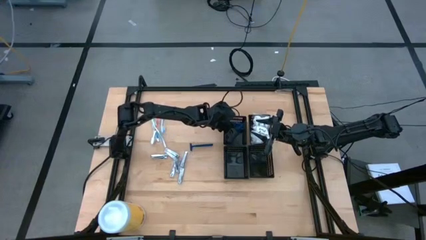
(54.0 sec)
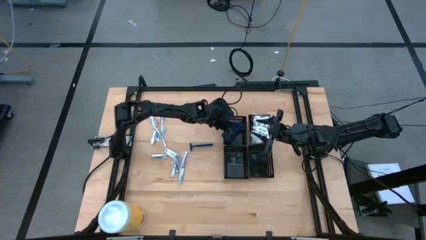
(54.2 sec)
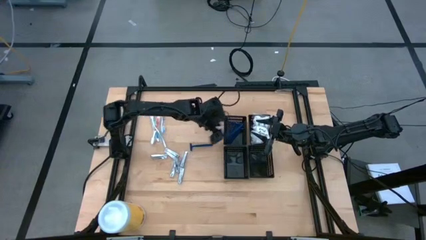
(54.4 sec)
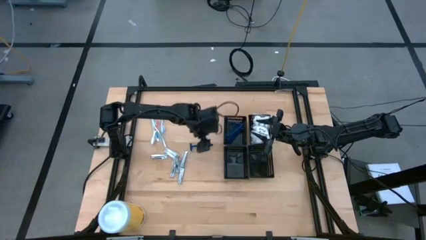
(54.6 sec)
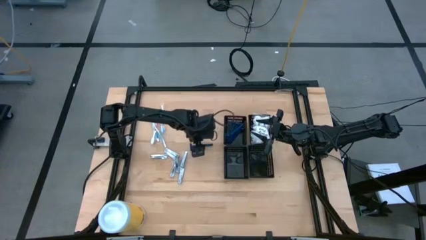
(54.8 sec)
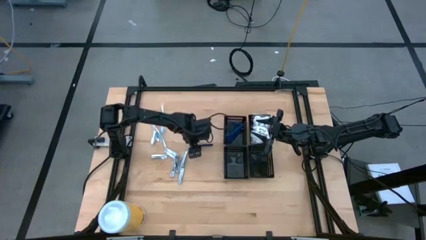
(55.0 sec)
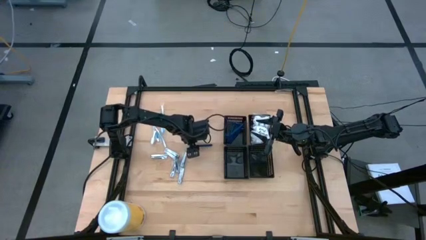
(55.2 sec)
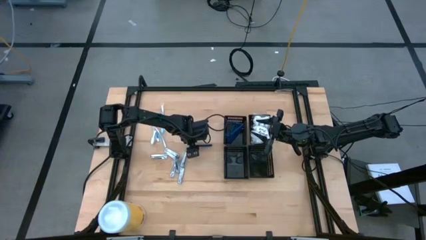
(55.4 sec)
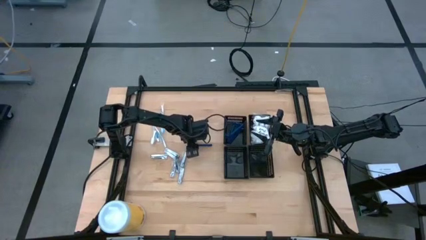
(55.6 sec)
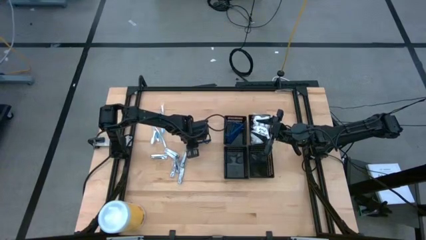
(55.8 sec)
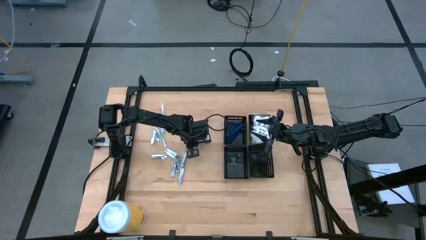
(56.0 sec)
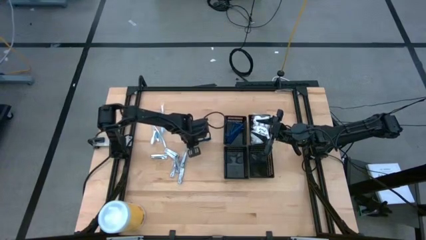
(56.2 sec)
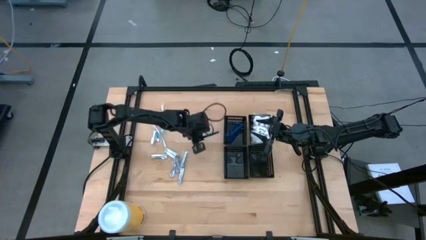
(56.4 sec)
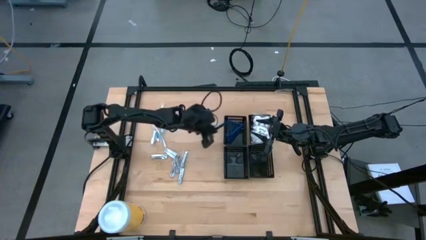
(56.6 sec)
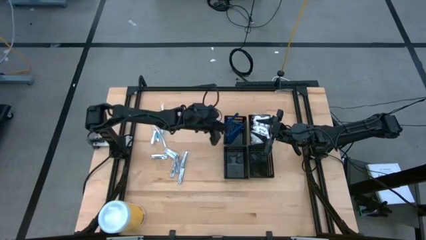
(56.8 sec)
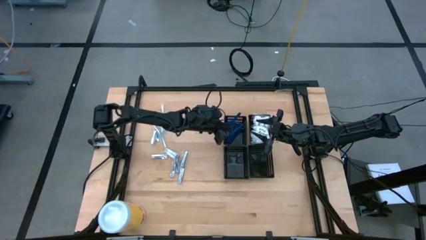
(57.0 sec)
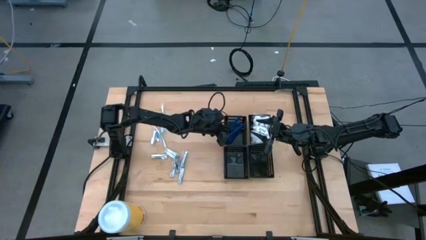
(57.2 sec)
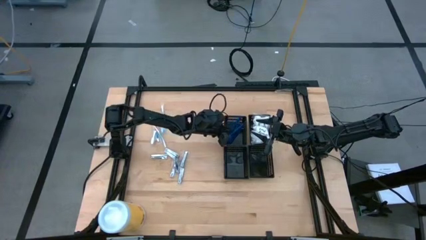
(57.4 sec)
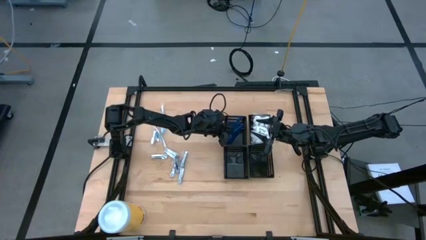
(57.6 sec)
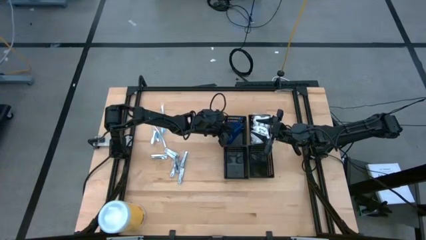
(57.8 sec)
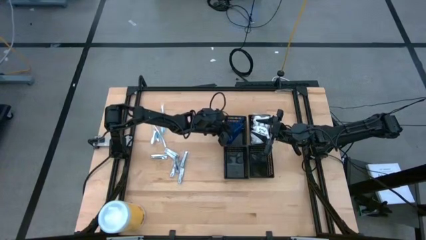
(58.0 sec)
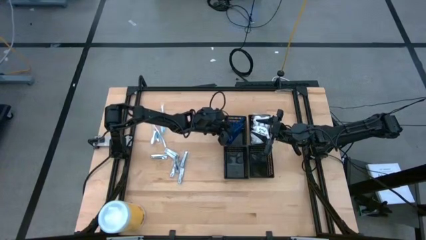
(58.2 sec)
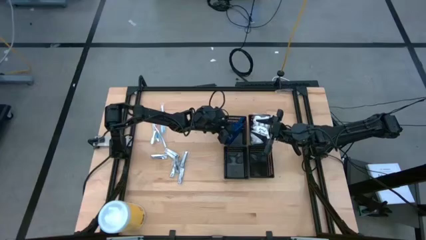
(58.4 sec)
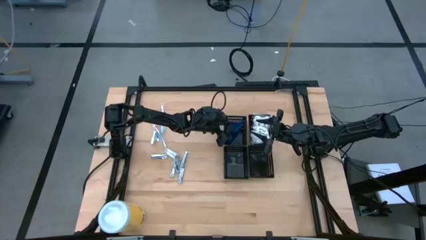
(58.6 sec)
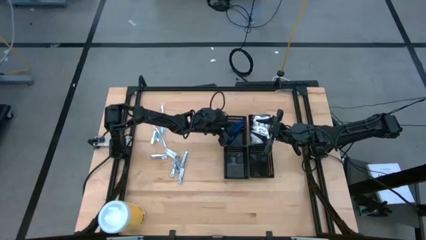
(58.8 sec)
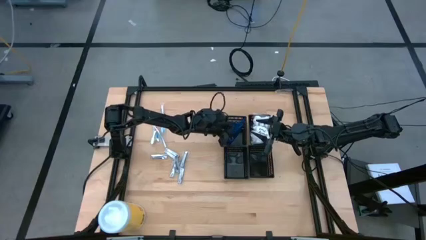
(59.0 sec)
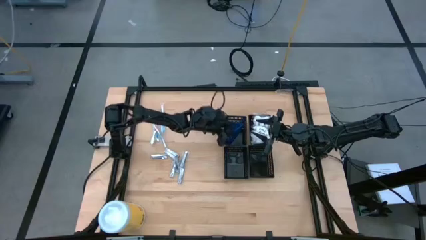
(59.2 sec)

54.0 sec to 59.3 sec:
Task: Pick & Place Travel size toiletries
Put the razor into the top left black basket

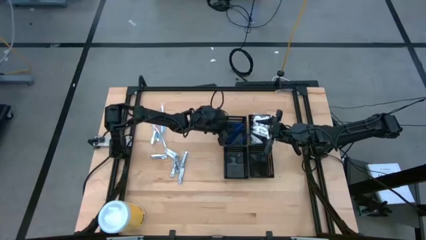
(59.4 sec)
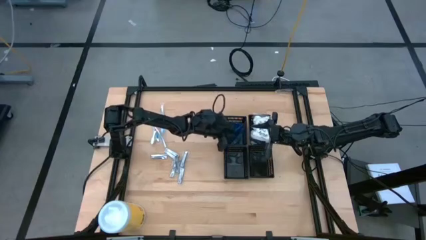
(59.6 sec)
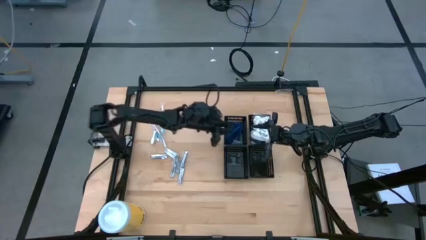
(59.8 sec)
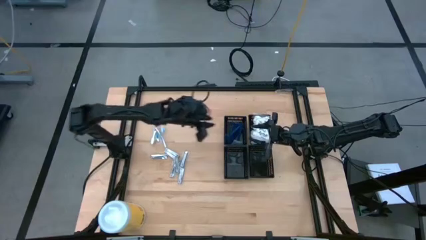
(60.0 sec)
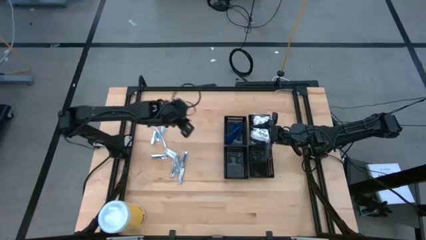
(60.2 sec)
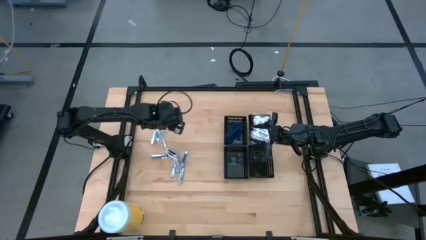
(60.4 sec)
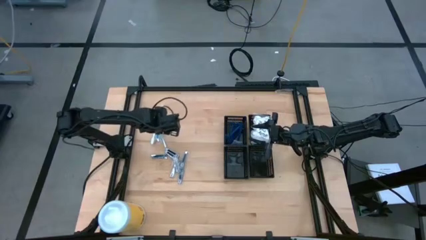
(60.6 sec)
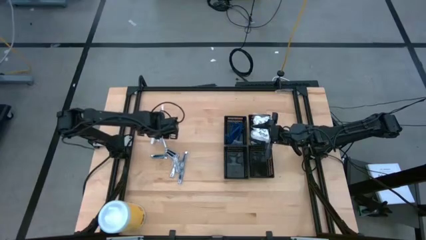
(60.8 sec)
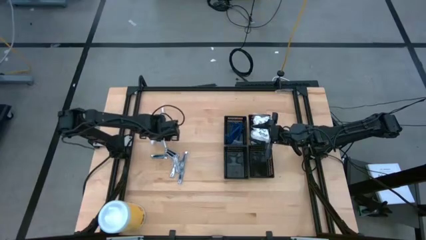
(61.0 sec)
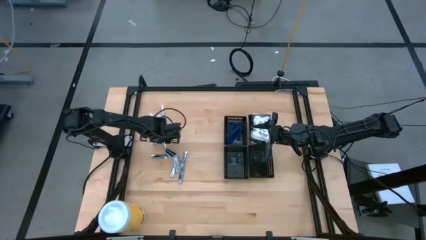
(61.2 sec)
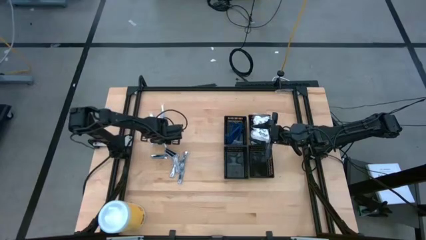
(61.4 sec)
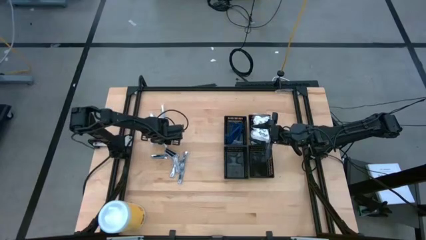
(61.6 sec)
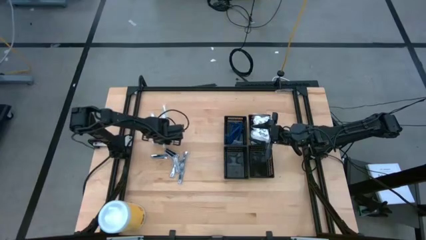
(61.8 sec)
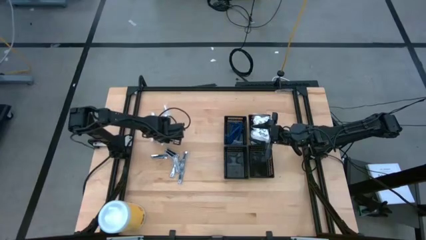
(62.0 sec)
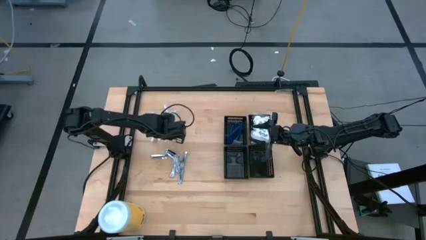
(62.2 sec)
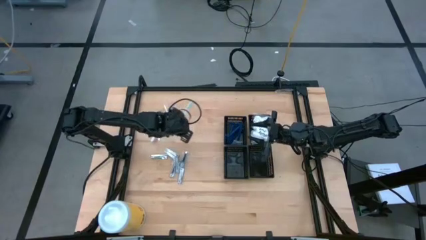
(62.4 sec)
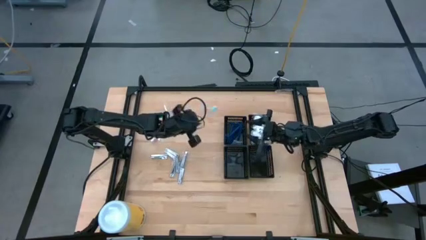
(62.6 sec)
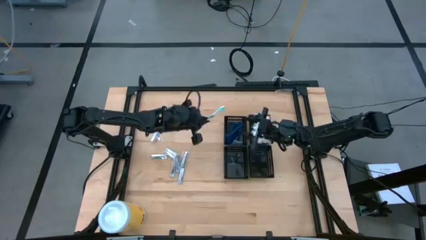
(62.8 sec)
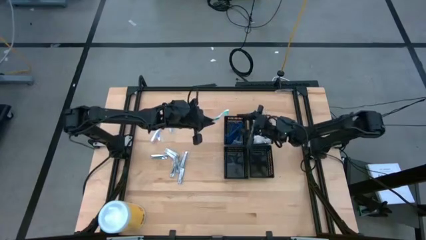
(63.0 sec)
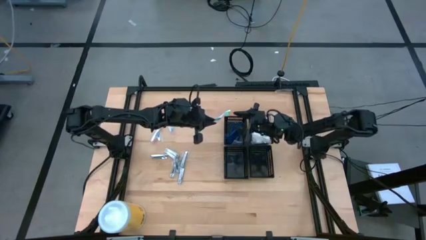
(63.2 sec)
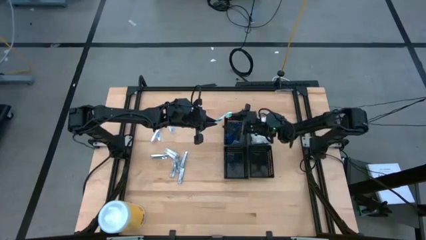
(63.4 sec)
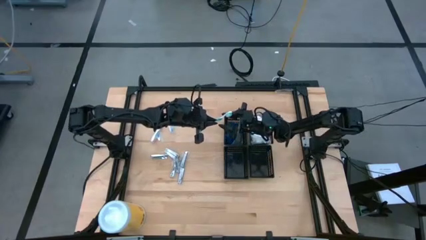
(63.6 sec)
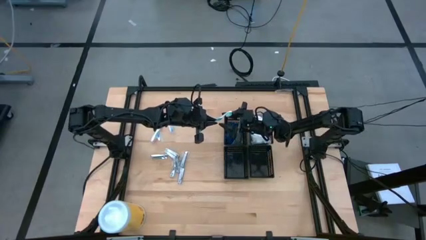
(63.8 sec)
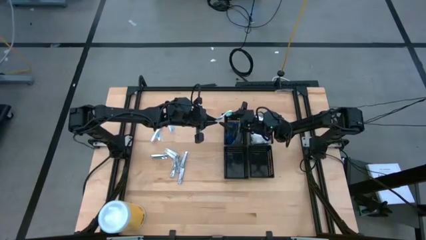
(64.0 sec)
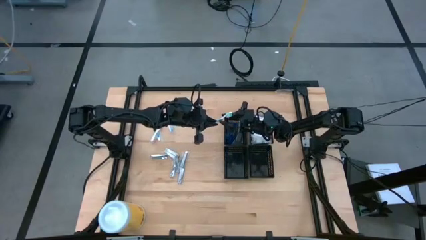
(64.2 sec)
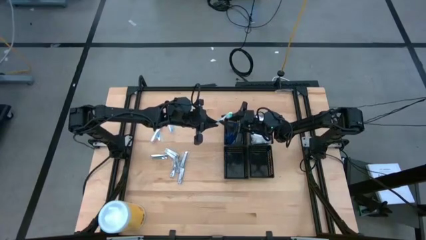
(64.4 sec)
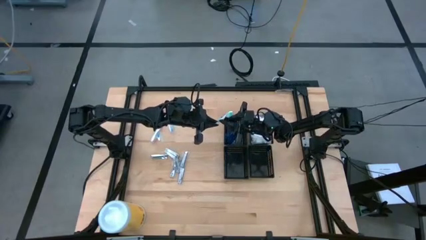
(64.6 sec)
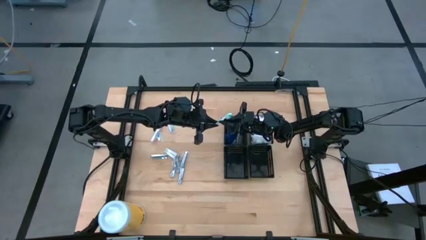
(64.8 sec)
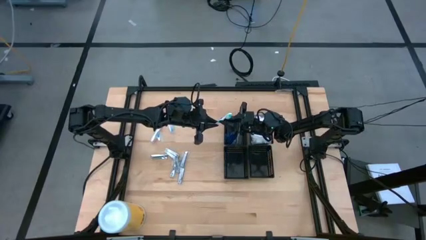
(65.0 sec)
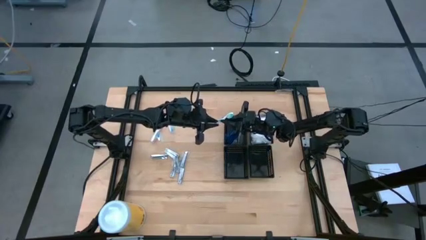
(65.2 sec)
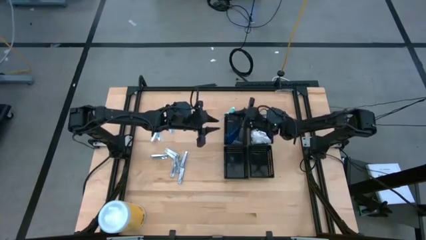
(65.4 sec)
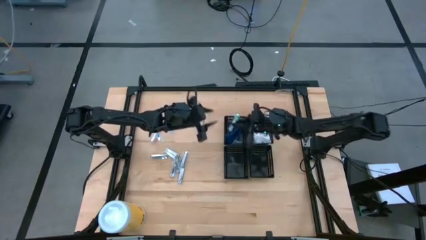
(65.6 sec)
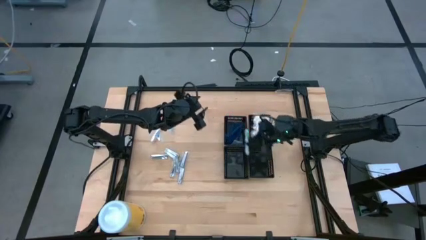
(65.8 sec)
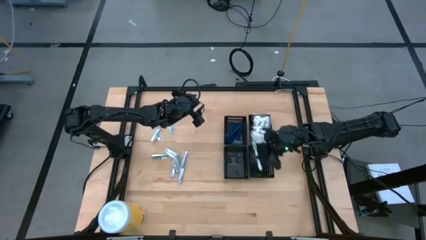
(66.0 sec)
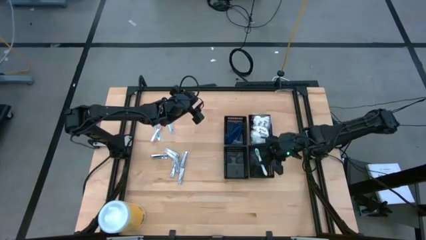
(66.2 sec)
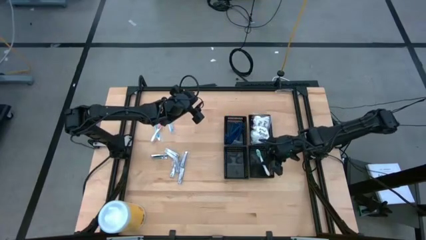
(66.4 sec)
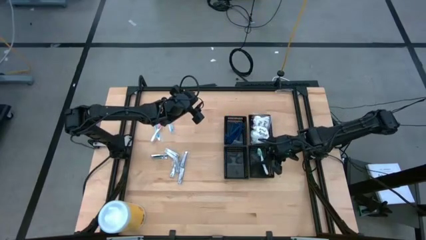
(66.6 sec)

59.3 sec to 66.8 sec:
Put the green toothbrush into the bottom right black basket

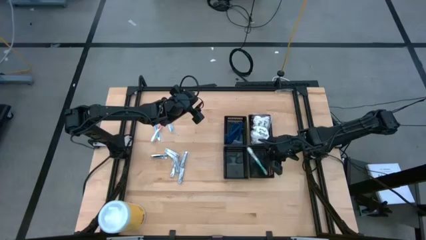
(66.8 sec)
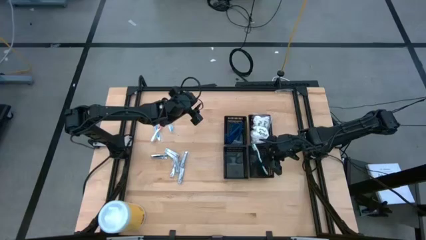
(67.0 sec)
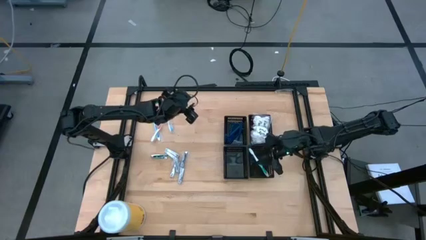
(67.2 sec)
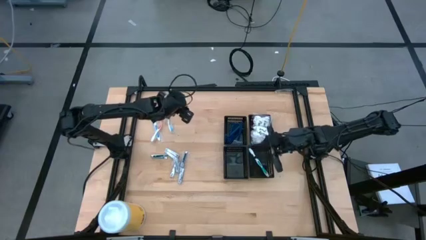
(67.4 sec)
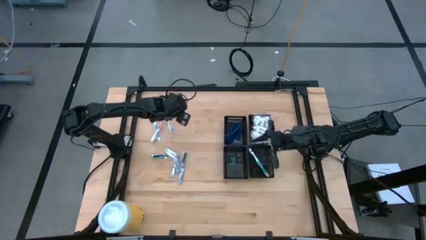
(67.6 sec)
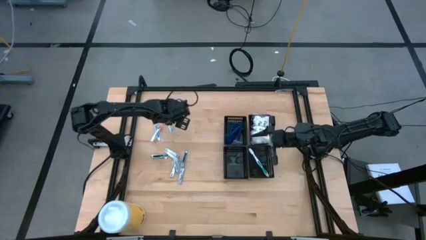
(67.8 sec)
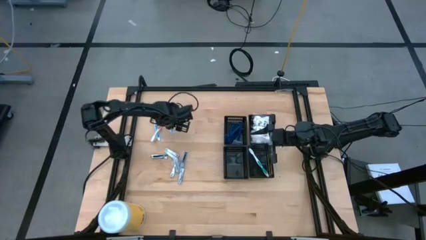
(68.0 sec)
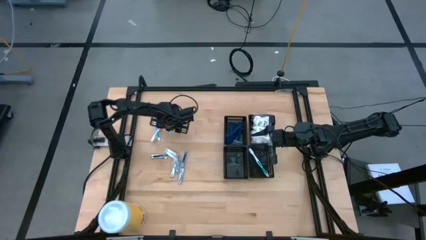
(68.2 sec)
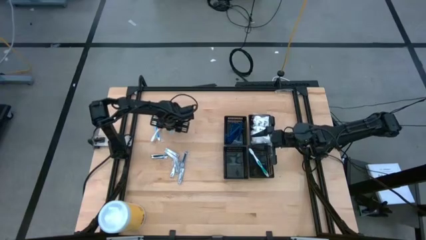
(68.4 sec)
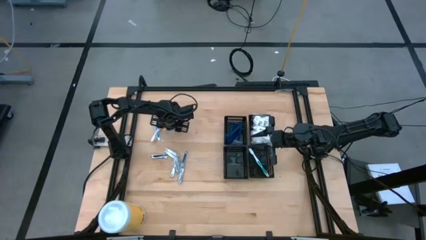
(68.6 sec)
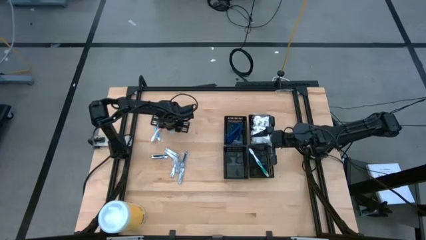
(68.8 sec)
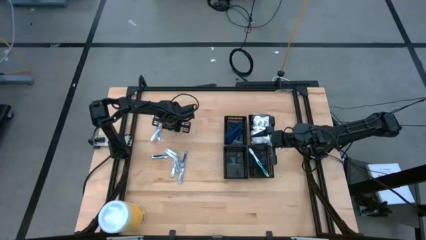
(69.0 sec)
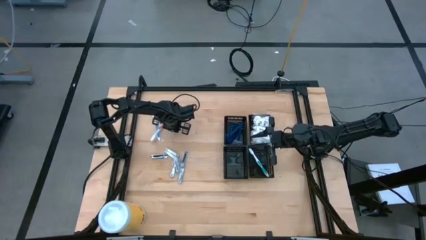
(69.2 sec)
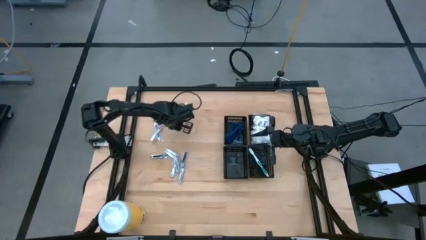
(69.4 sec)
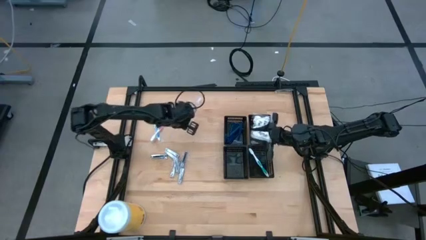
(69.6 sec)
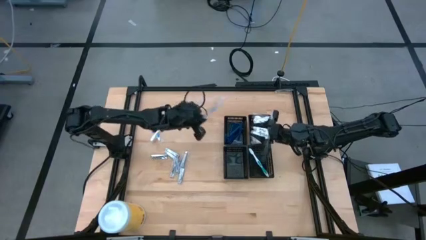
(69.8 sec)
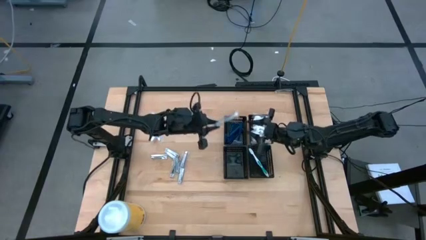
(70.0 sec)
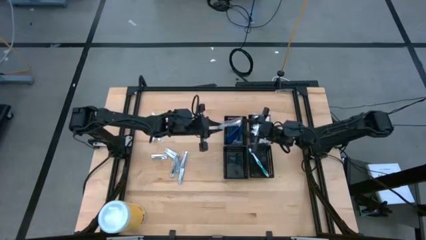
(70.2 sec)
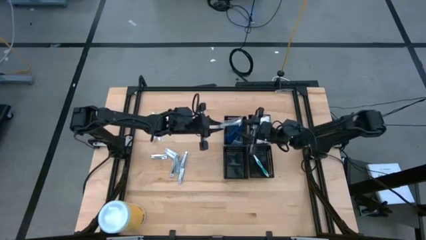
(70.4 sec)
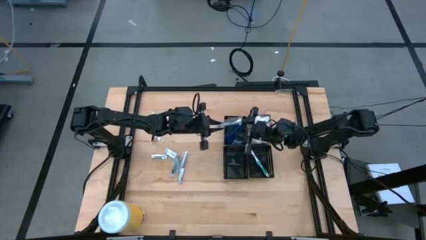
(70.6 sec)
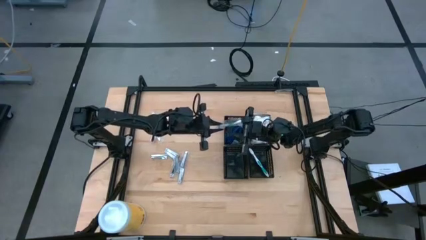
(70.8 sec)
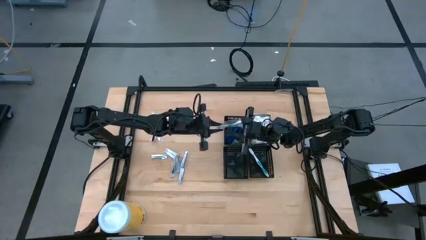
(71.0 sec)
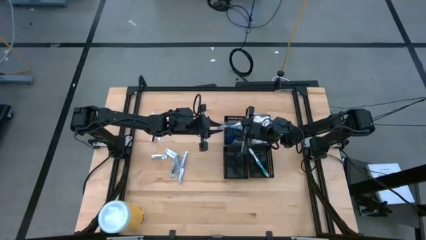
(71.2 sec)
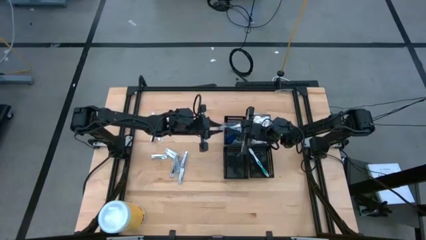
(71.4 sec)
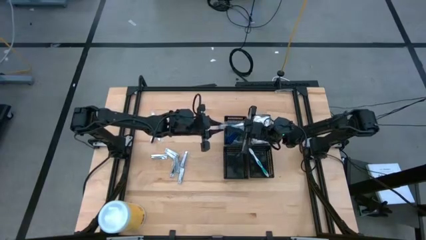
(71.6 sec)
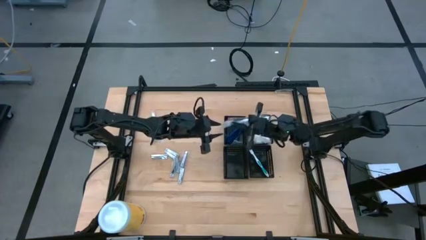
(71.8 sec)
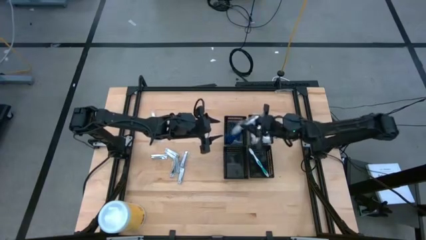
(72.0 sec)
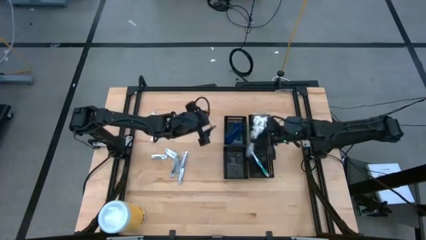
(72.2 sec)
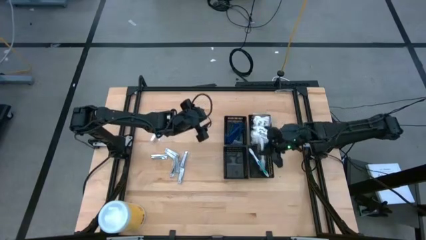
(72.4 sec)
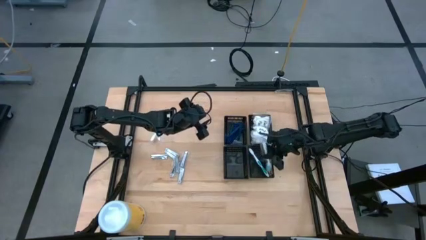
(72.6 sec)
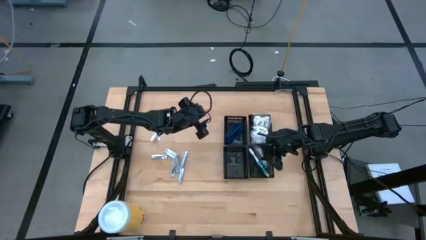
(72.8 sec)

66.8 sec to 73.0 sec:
Put the blue toothbrush into the bottom right black basket
